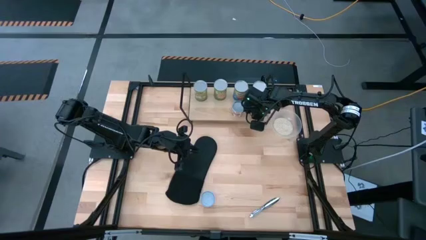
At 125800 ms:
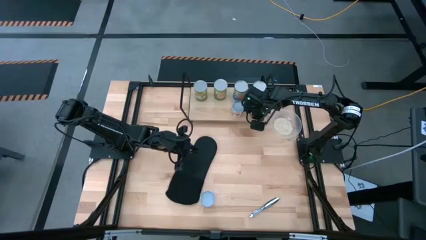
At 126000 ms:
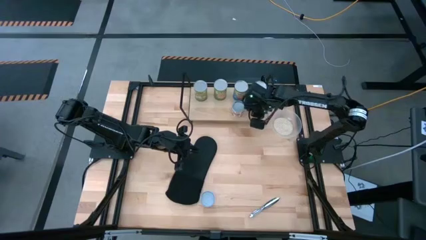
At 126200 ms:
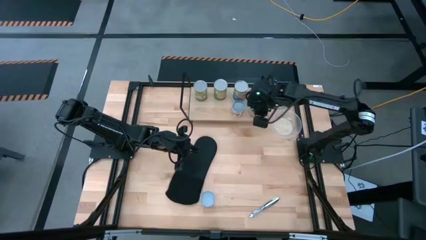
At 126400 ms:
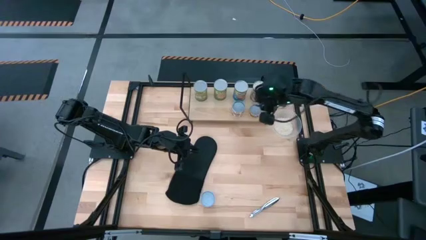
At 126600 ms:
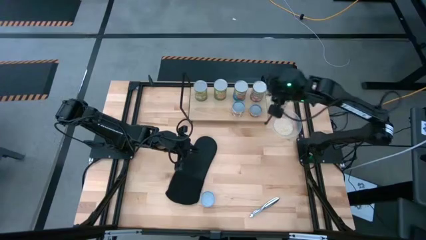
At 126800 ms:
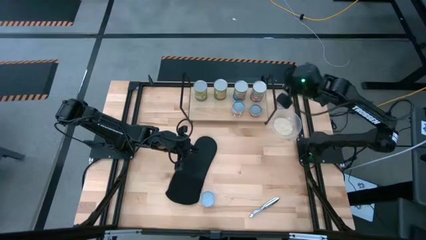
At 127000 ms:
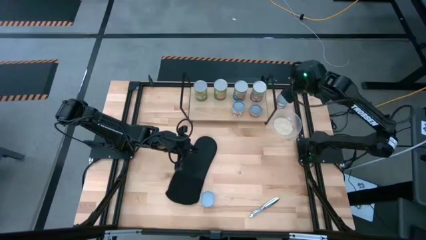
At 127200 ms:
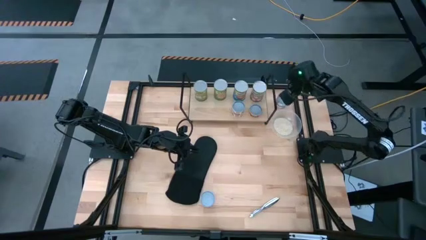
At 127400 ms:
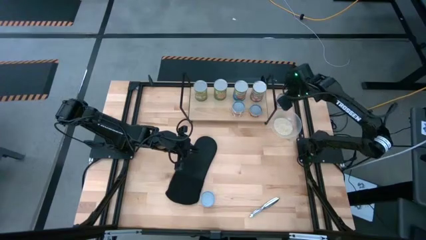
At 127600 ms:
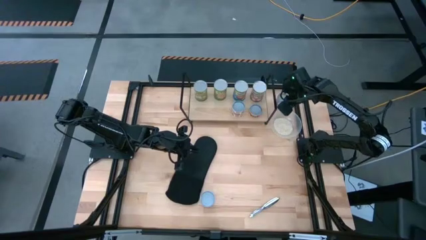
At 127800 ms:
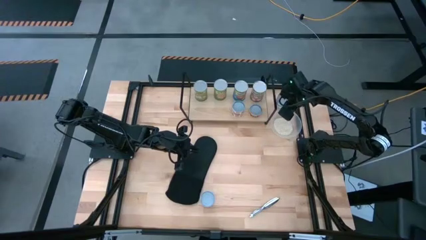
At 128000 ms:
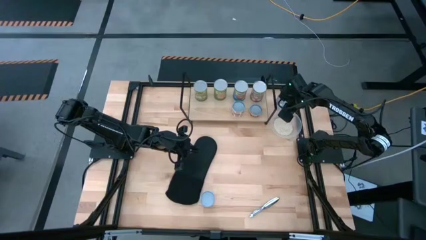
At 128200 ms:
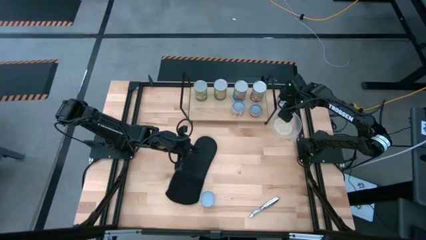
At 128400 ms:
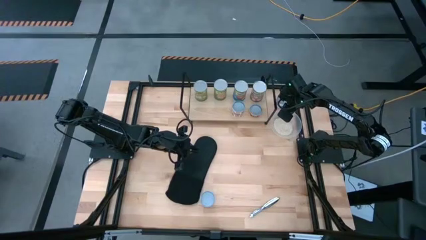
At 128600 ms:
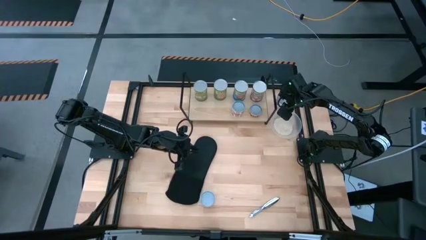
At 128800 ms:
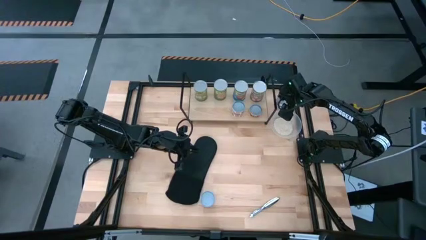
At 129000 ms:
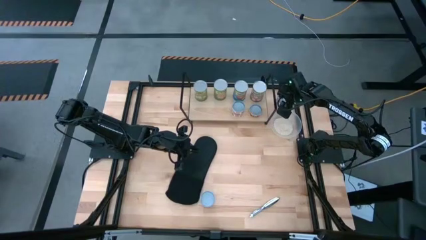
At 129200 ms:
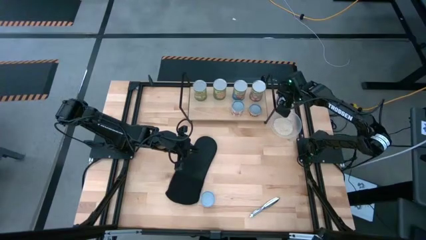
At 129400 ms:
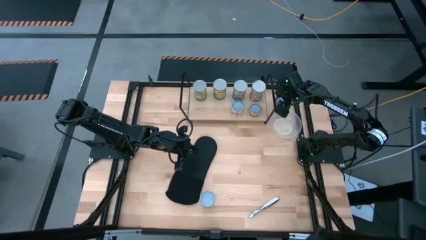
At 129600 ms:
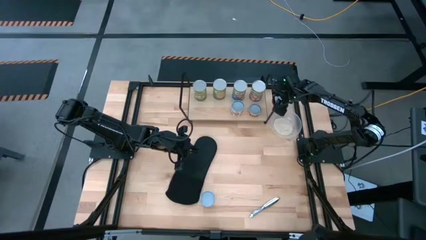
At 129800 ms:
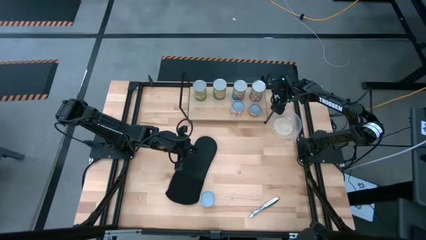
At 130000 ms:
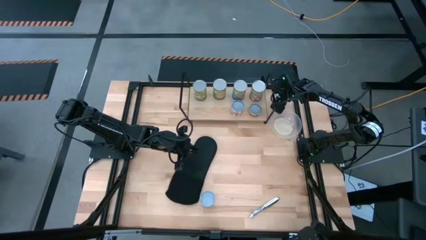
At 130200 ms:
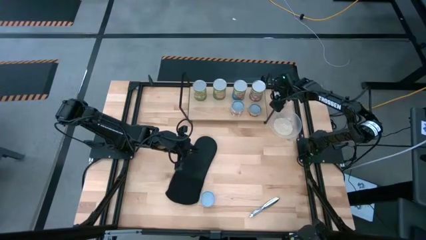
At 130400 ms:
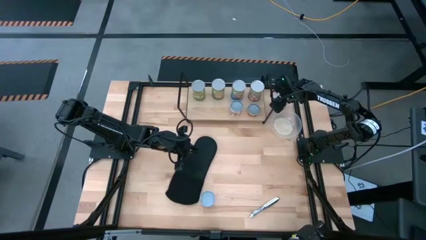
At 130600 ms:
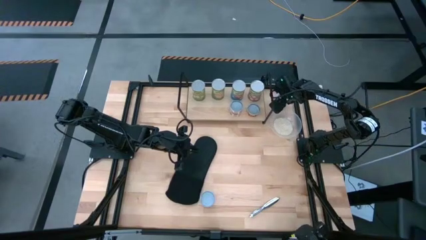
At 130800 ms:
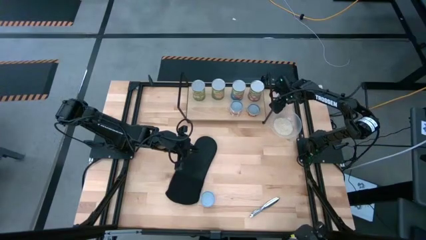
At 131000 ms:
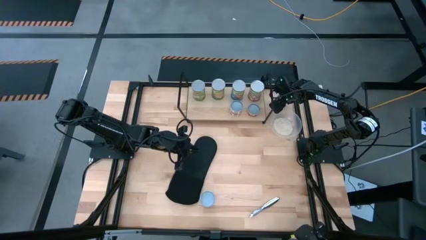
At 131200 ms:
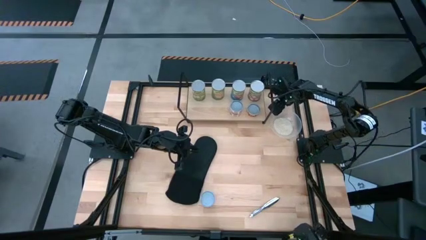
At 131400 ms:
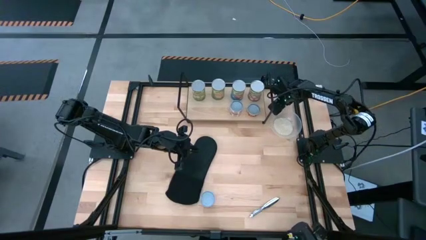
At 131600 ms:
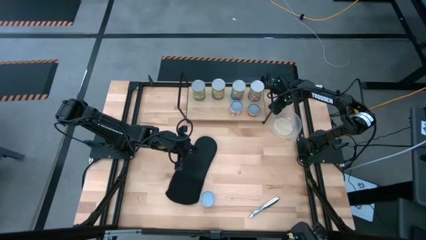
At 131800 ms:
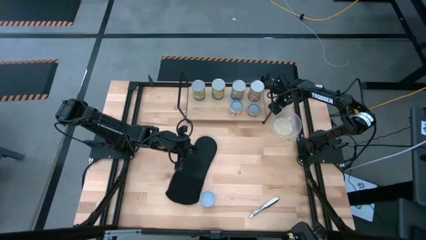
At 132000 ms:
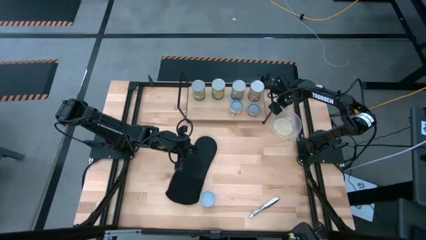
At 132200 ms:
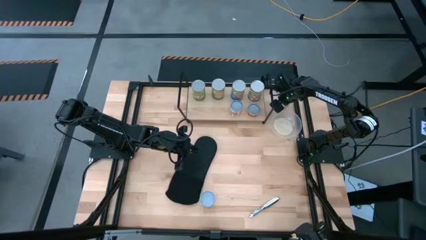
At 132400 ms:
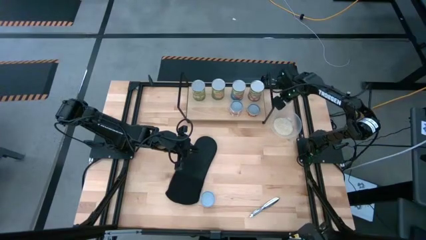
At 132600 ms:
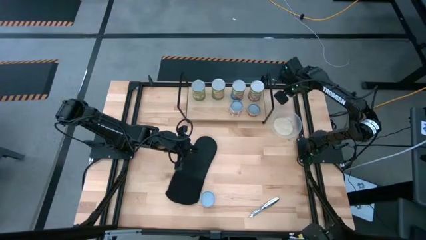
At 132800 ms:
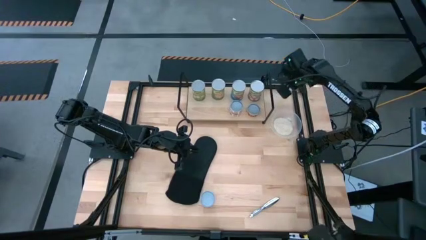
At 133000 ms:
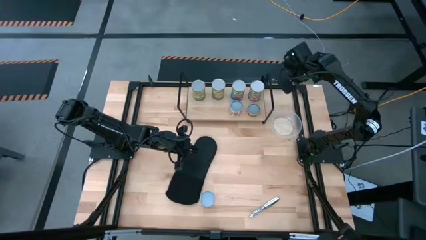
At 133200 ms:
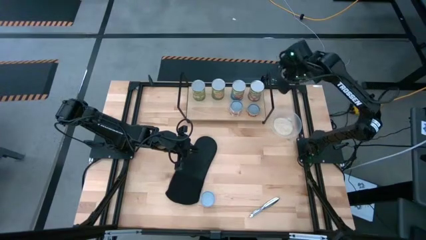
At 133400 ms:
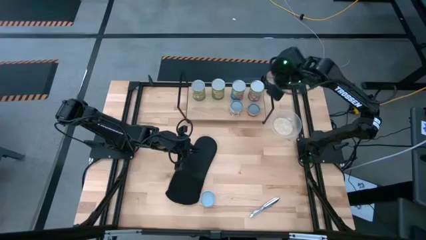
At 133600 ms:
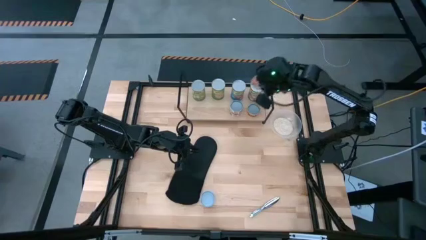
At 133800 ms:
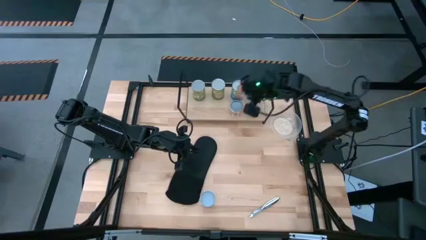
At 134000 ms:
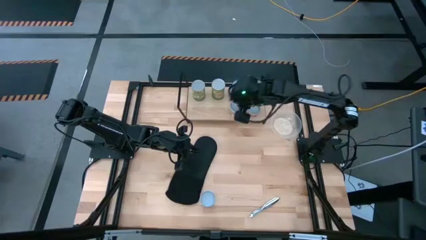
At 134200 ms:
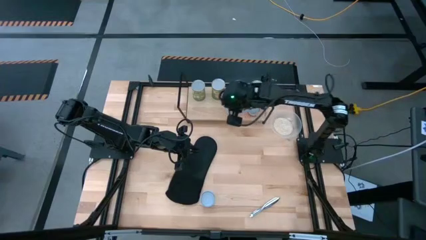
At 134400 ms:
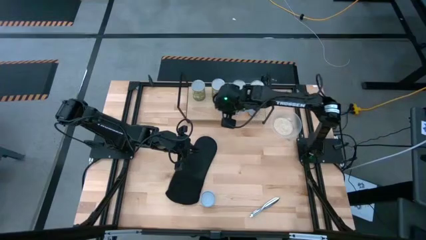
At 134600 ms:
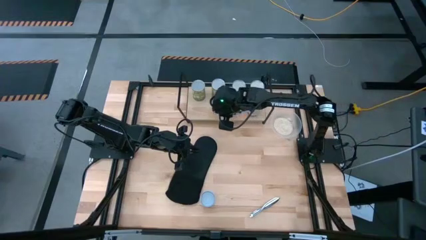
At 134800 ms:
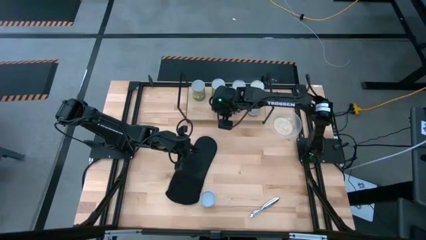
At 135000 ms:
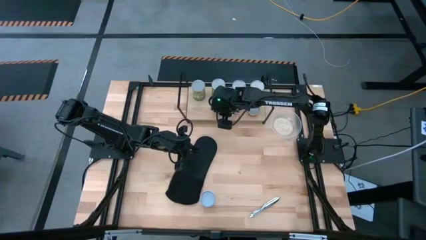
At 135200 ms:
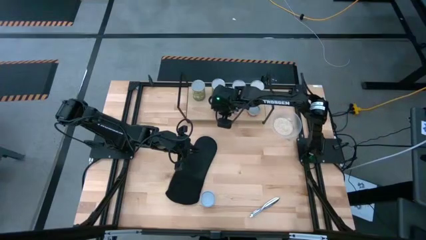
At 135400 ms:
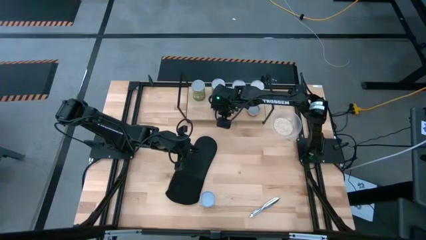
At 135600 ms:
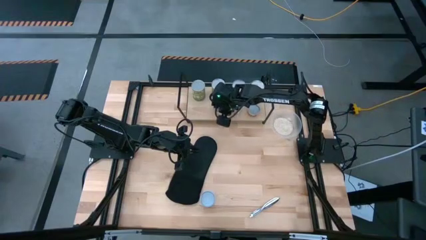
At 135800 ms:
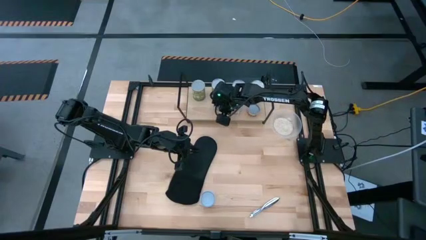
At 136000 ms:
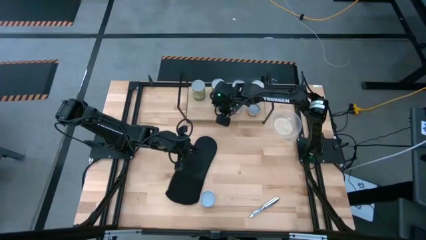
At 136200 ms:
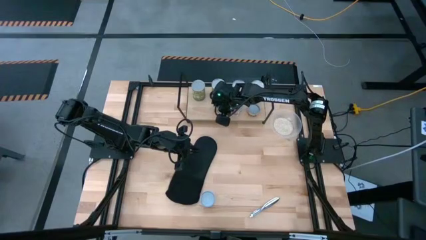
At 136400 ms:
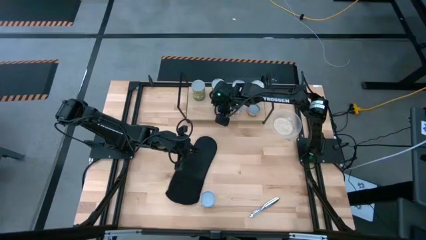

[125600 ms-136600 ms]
Task: Pick and place cans onto a shelf
Put the small canned oranges on the shelf

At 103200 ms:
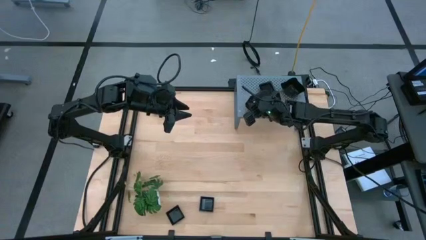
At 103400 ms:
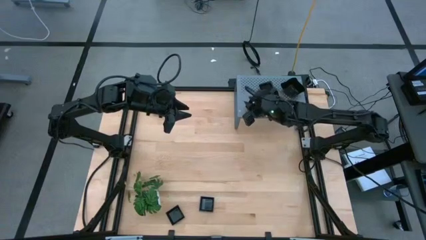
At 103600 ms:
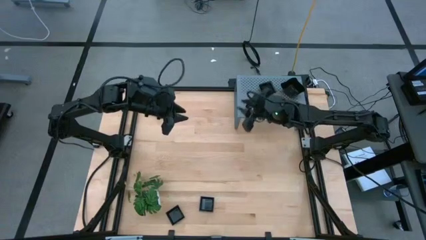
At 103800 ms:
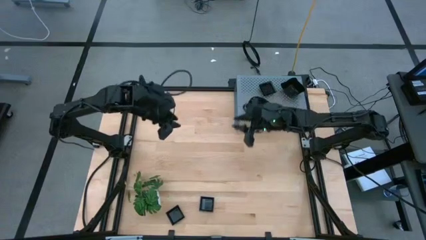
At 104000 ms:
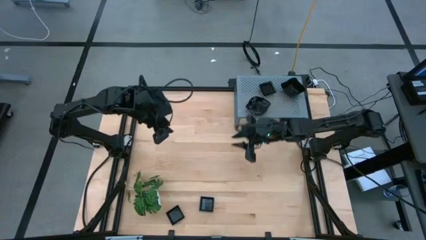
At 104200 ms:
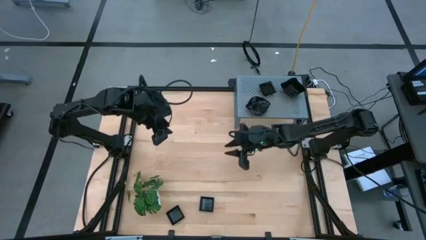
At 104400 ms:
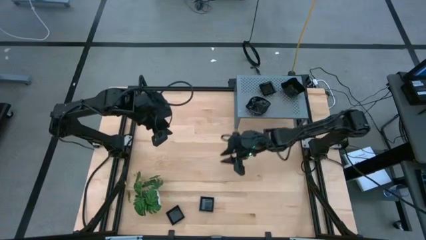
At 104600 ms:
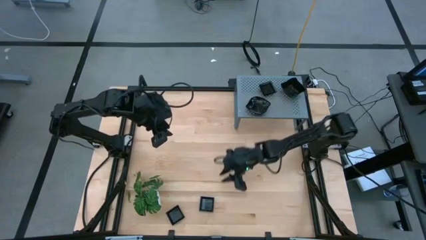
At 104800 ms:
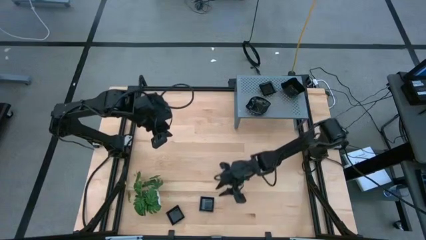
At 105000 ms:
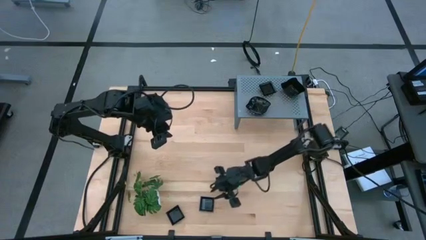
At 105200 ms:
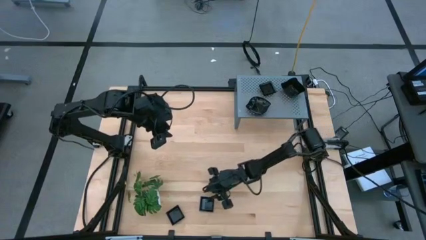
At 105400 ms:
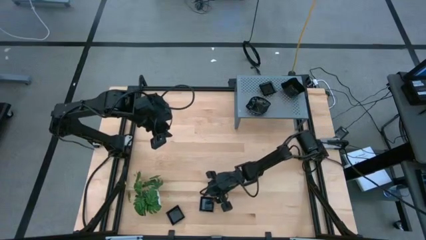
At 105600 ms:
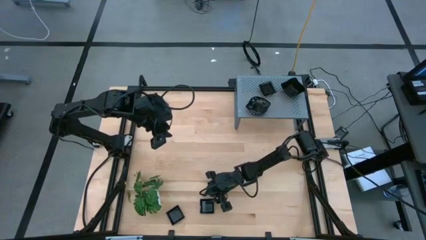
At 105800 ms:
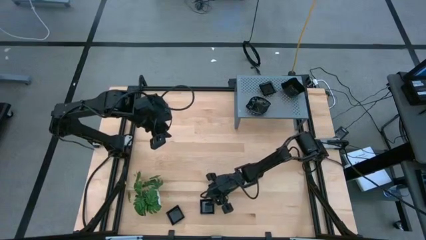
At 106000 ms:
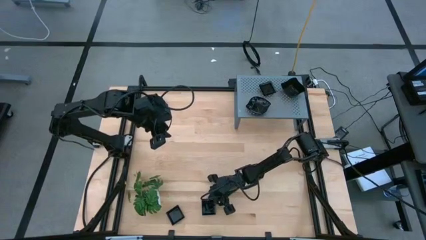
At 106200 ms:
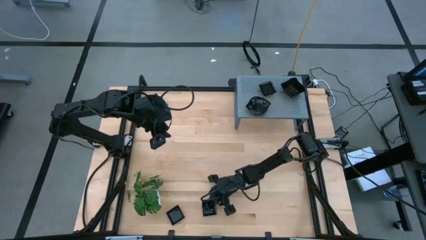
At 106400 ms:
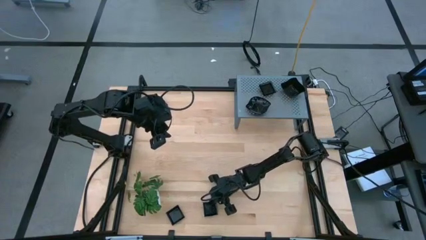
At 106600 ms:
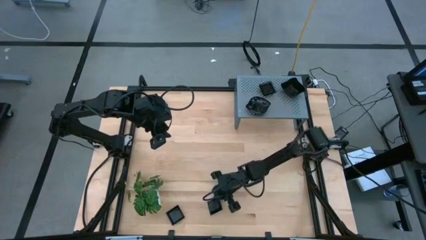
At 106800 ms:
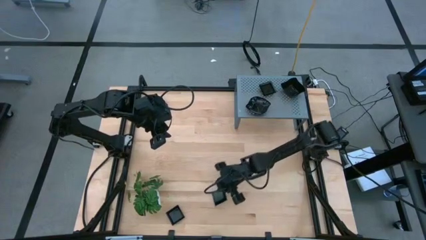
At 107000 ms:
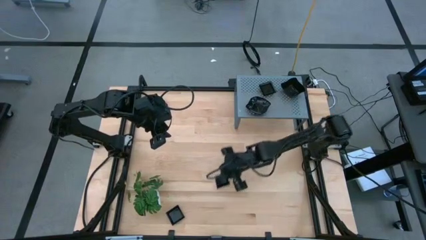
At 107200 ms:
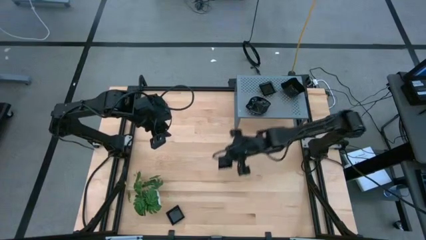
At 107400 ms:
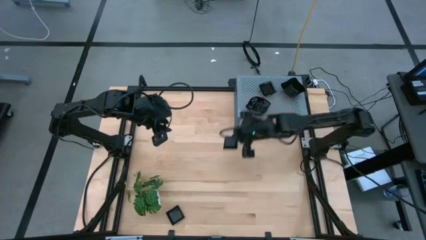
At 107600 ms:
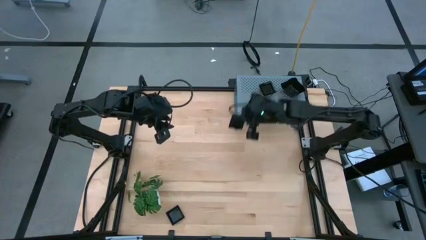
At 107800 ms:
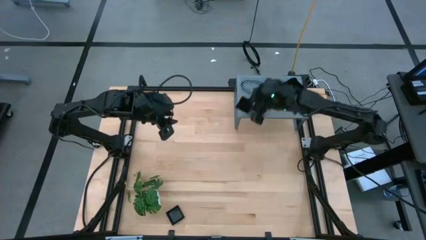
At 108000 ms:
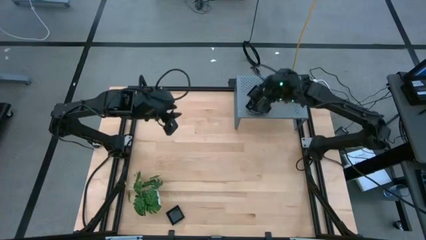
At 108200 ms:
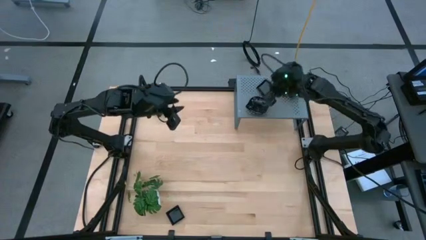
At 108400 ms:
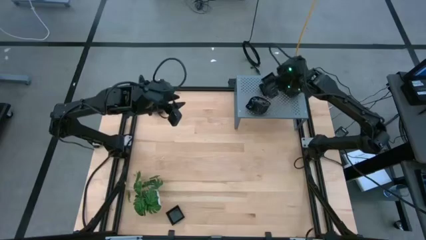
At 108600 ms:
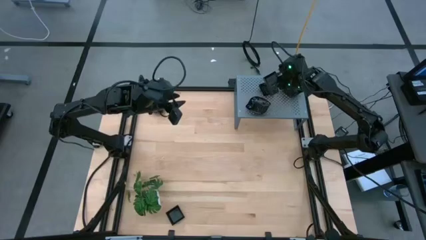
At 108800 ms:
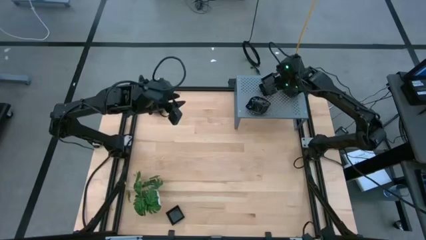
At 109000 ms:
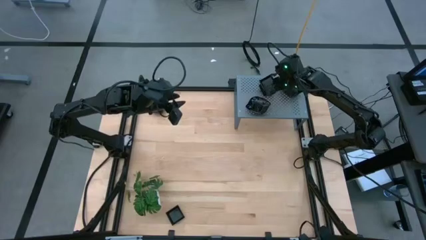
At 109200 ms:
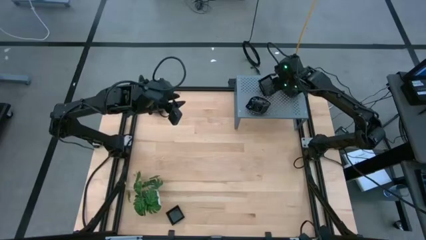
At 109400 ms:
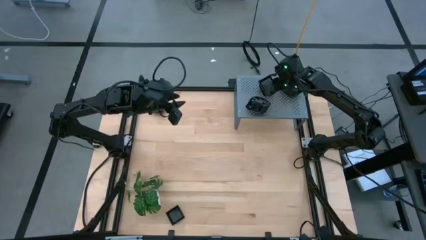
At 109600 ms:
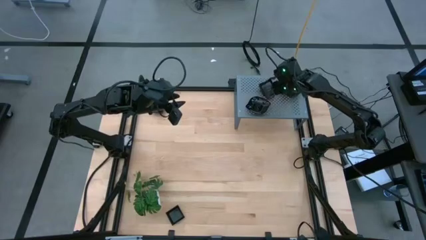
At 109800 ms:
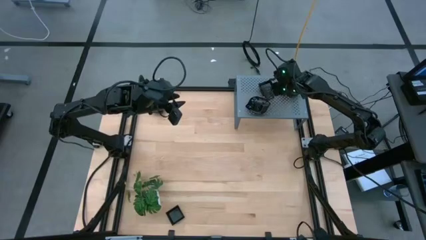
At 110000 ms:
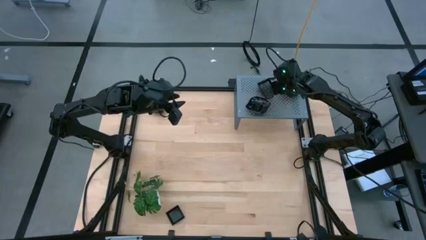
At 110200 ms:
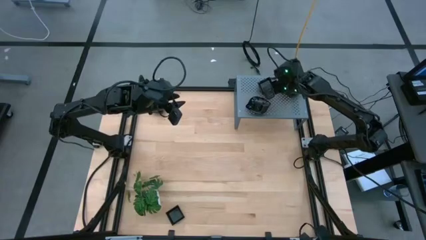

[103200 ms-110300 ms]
Task: Pick & Place Mini shaped plates
Stack the square plate on top of the other square plates
